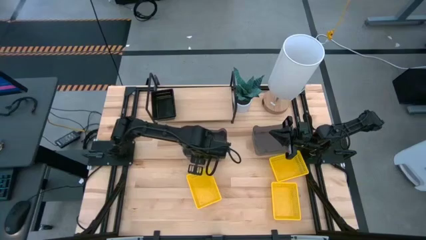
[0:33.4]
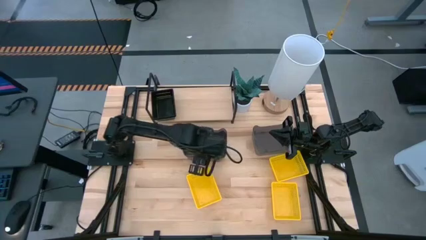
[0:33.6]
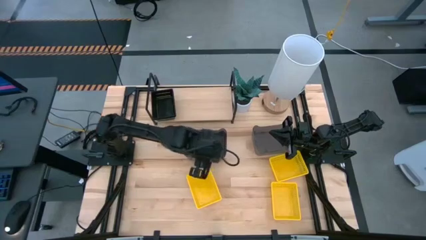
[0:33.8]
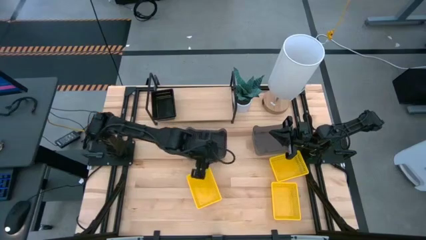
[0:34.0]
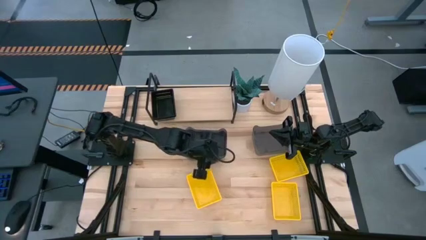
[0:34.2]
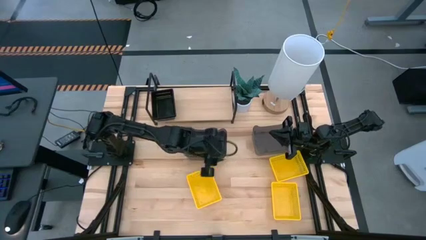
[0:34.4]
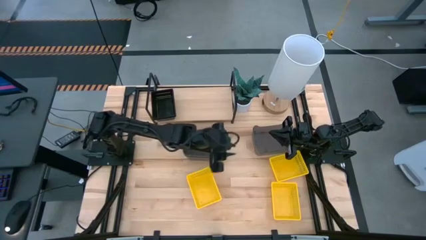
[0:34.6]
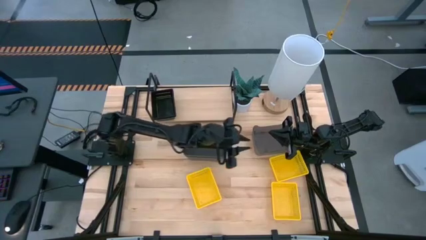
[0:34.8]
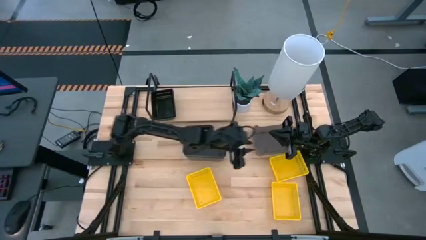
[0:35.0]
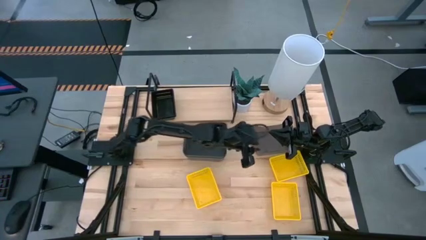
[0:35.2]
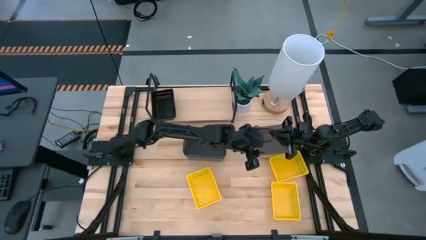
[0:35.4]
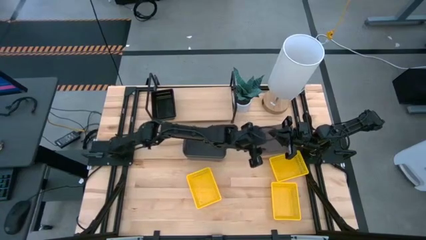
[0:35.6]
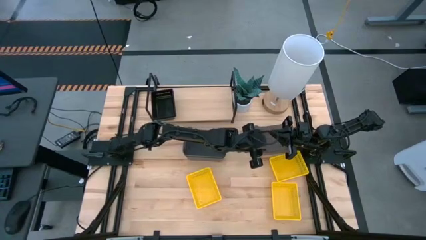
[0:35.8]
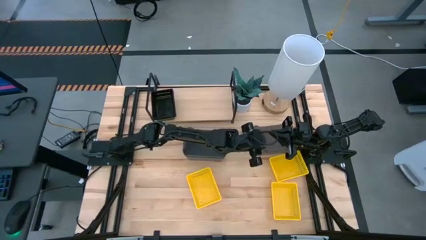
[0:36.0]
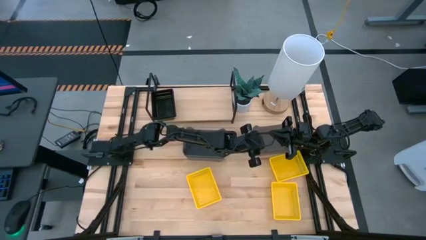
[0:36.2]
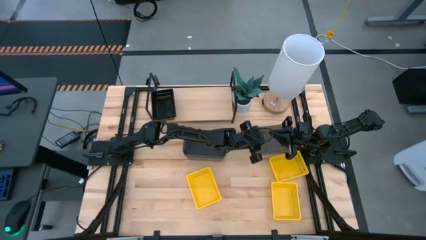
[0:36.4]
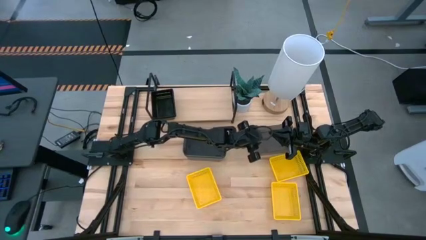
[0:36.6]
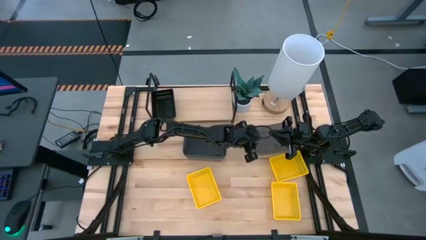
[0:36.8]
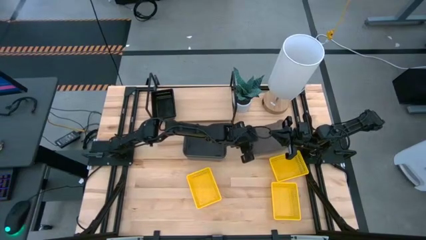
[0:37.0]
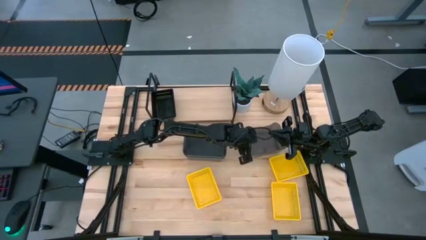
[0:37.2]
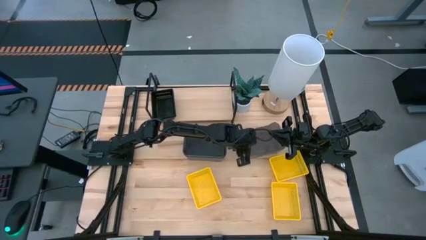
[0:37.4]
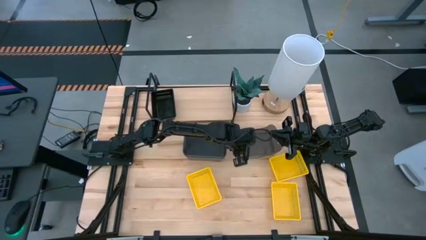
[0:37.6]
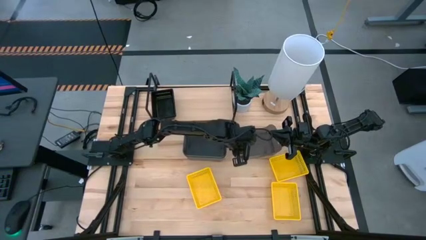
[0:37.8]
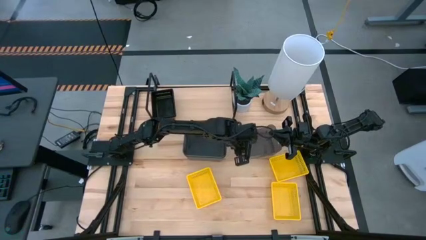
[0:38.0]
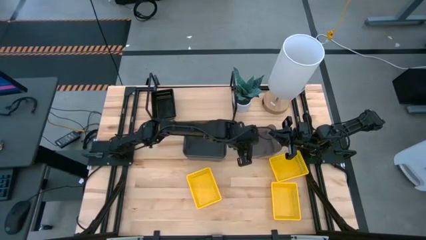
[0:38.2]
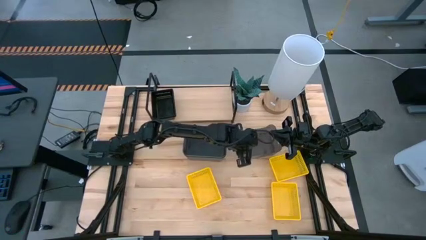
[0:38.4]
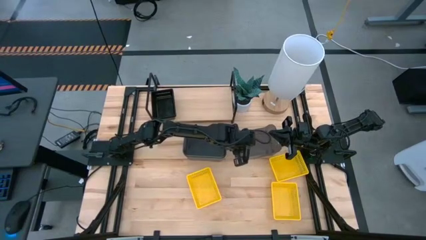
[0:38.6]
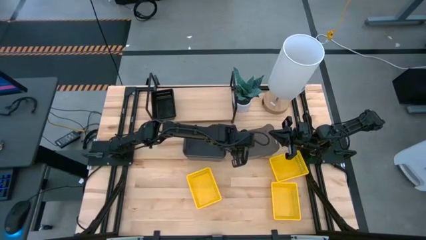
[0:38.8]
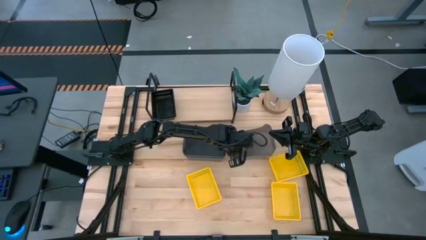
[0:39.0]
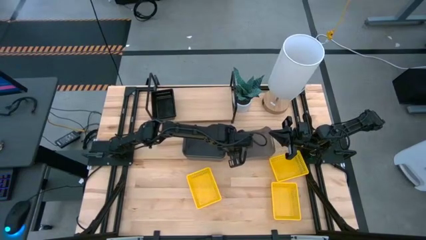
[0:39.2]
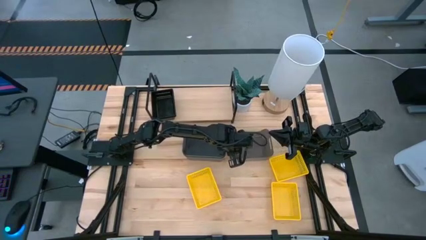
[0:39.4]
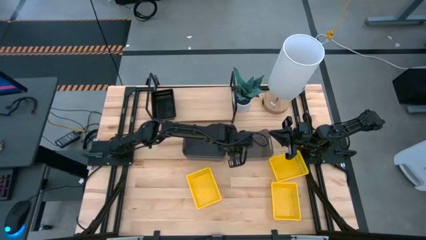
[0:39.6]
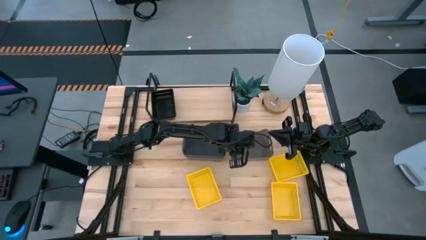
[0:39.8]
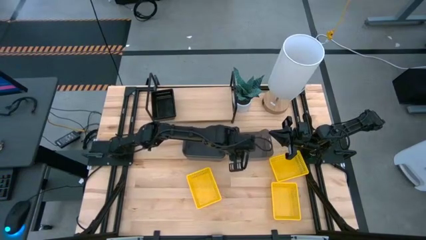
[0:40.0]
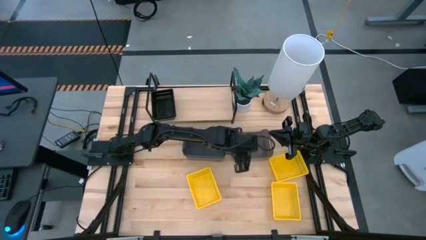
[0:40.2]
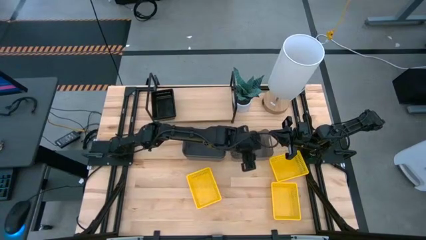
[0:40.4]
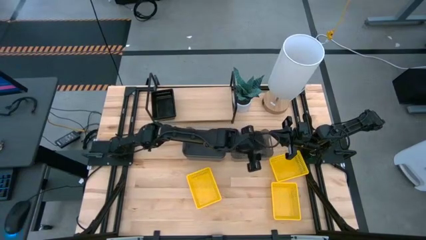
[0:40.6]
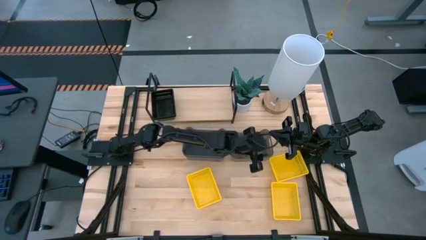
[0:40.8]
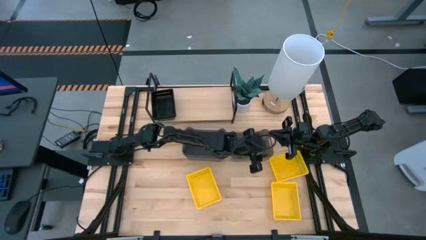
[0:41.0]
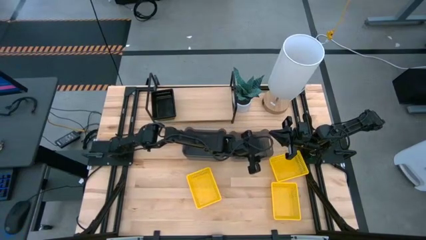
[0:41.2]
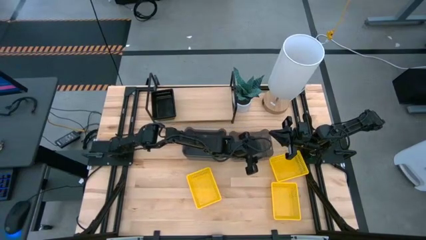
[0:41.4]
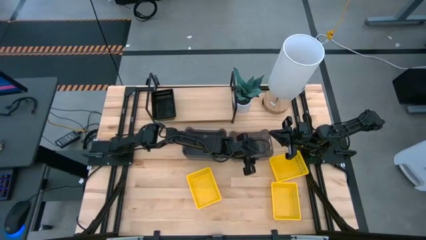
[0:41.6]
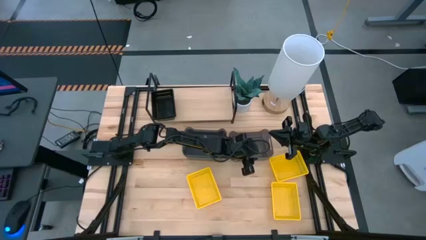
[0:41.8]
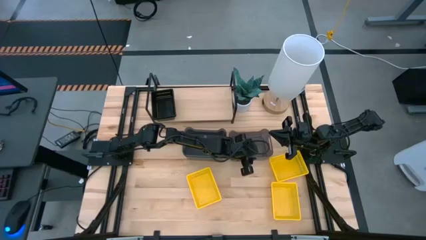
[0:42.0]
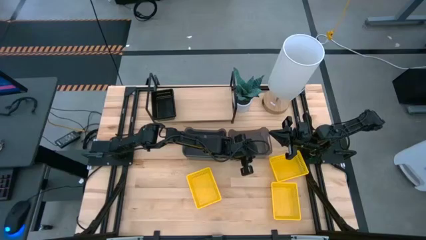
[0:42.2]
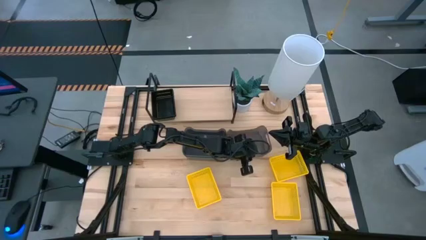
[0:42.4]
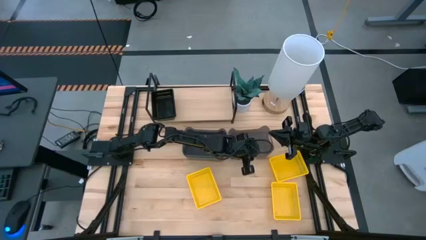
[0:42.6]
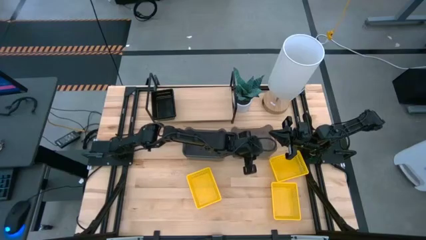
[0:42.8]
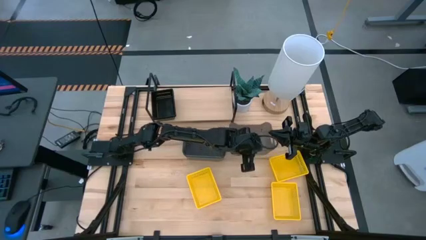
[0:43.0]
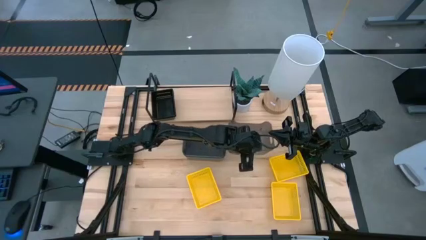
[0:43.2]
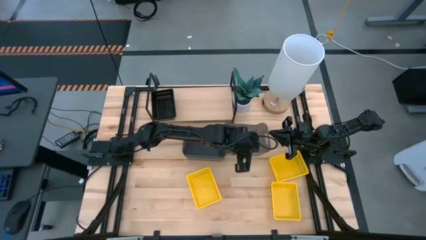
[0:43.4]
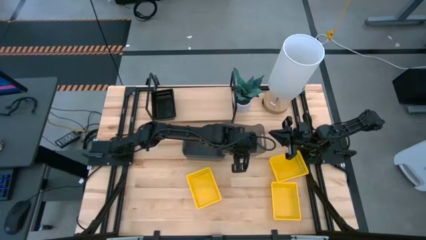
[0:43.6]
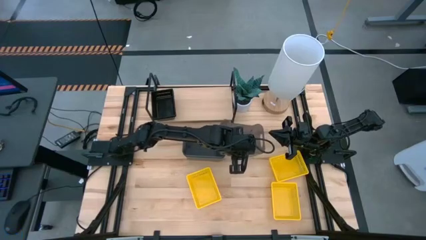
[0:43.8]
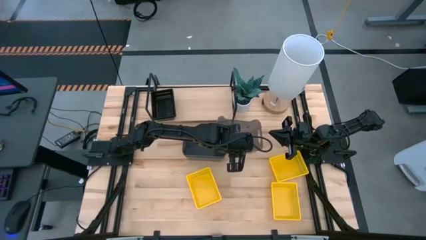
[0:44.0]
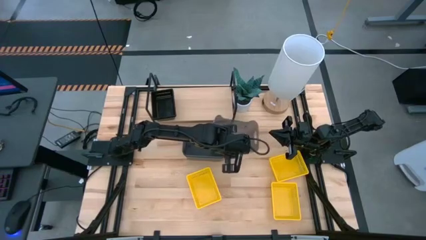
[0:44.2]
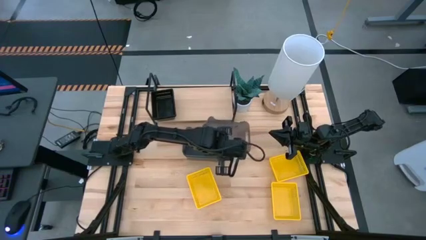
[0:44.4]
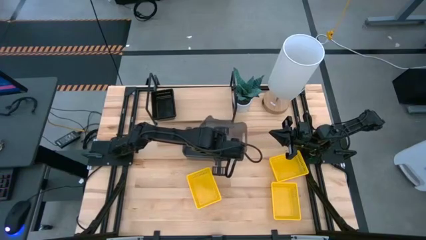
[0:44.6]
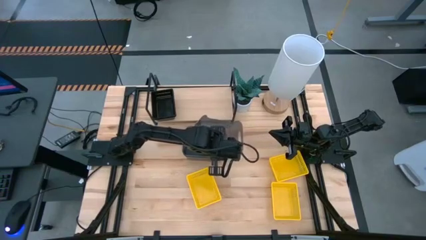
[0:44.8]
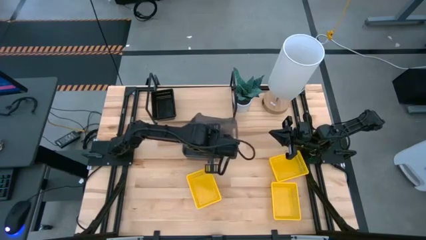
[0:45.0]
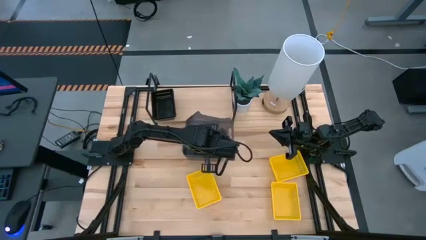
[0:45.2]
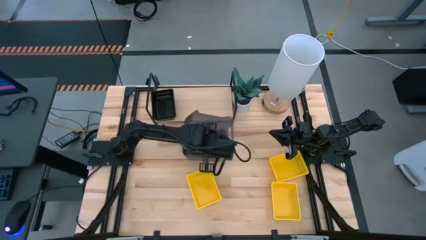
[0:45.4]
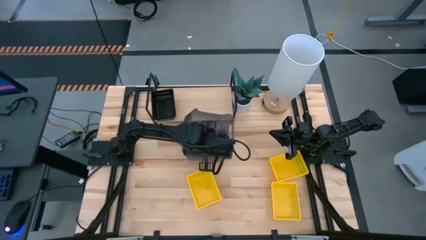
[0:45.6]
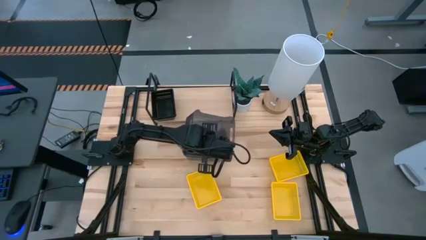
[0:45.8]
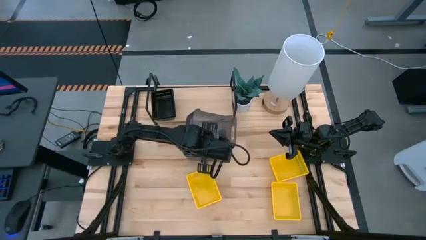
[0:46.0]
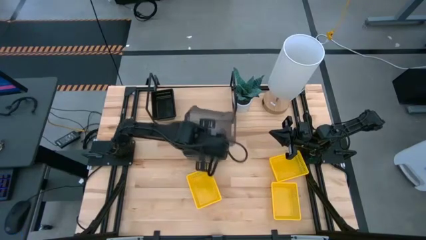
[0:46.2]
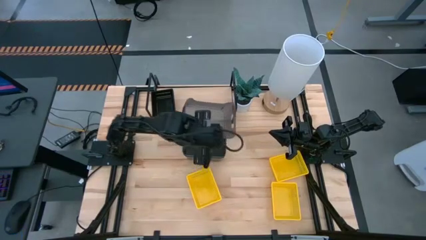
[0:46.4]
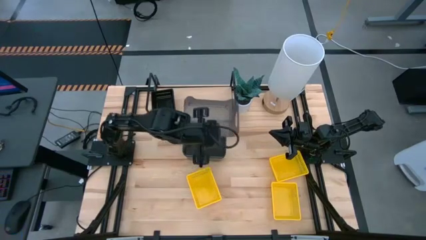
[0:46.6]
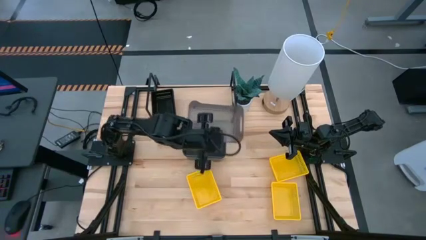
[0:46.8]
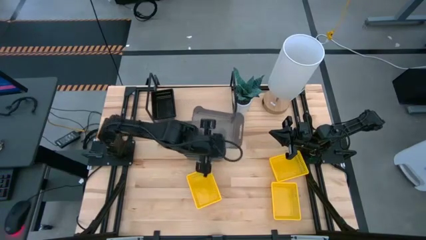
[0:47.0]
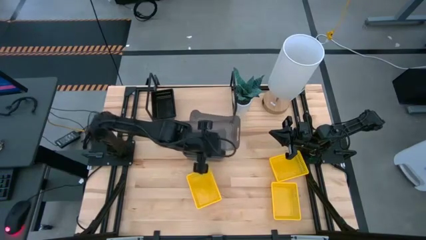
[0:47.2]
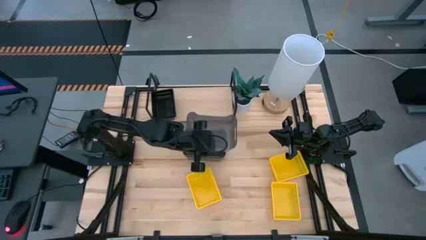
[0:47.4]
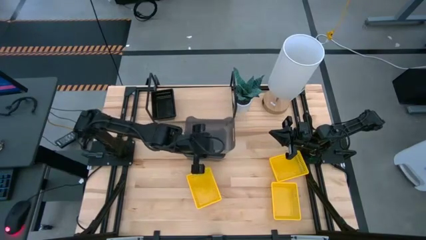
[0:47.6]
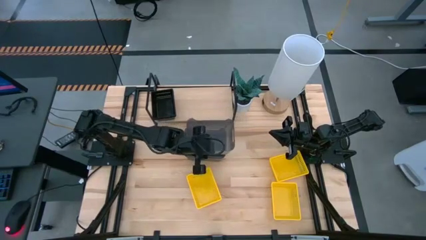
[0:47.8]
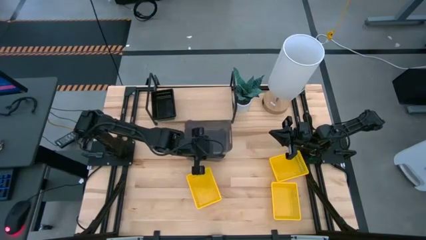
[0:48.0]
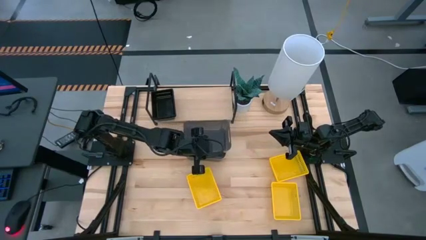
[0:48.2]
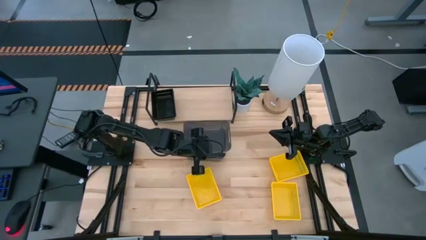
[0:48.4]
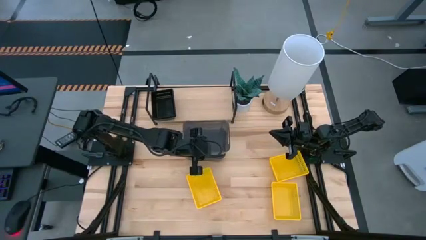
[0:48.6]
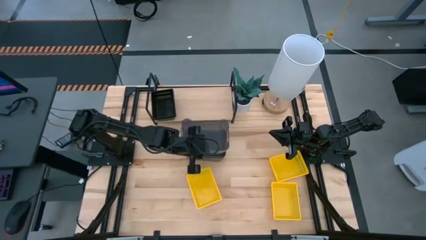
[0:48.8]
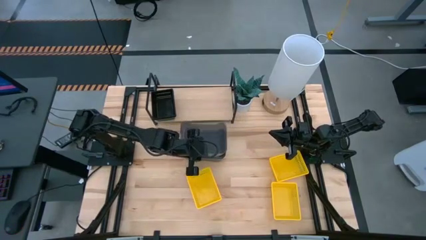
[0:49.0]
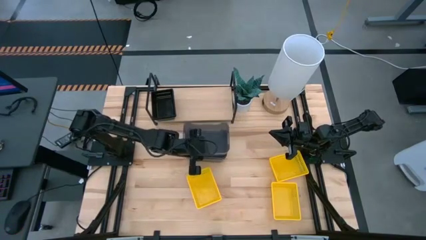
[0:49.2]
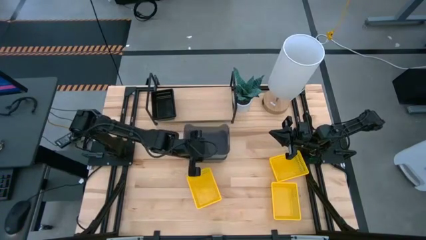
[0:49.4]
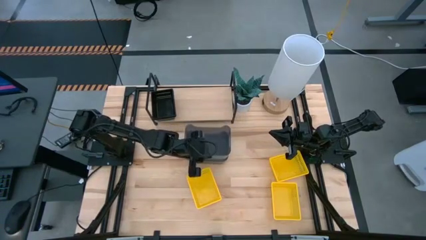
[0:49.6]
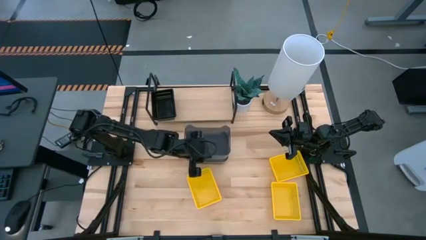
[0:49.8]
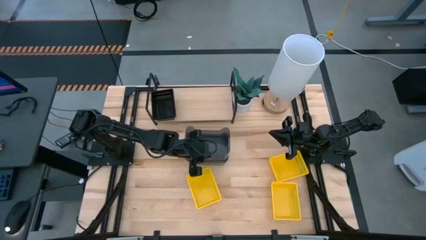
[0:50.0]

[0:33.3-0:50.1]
Task: Stack baskets on shelf by color
Stack the right gray bin on the stacked gray bins
